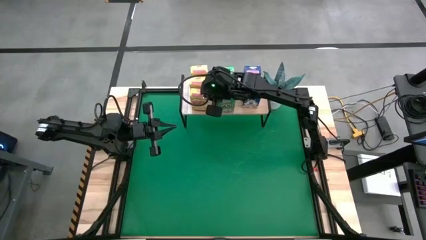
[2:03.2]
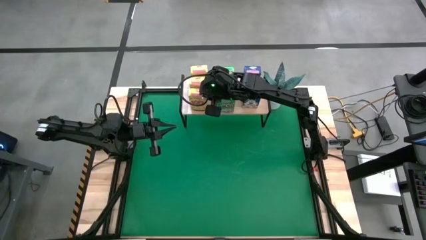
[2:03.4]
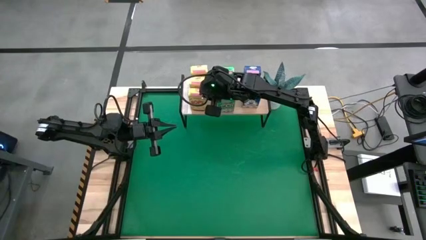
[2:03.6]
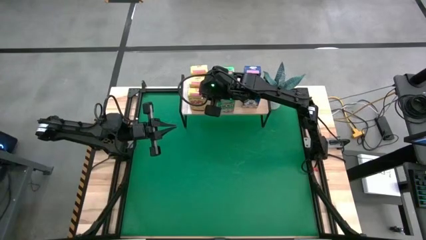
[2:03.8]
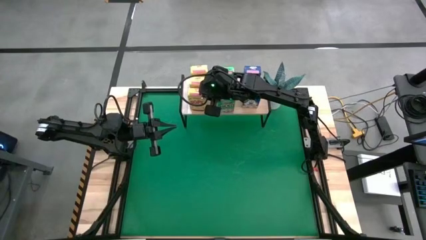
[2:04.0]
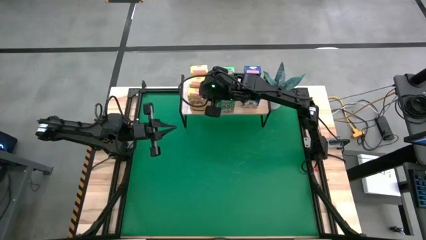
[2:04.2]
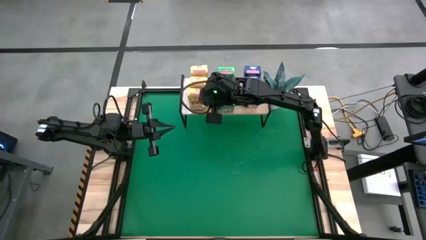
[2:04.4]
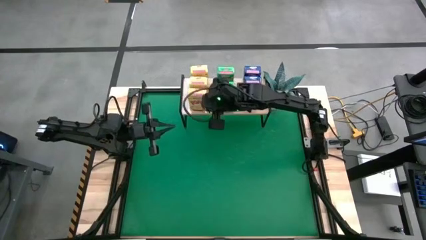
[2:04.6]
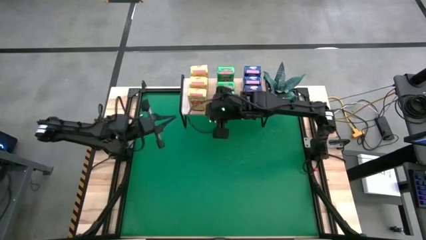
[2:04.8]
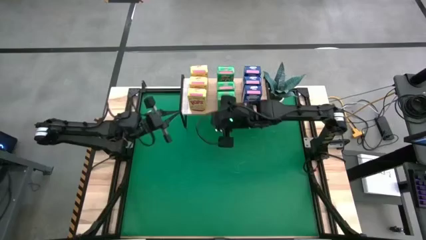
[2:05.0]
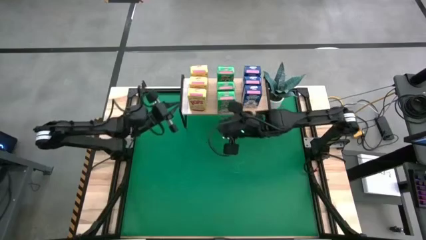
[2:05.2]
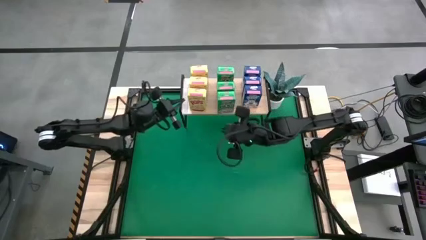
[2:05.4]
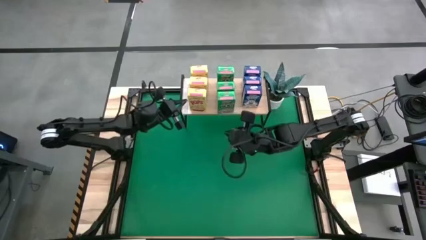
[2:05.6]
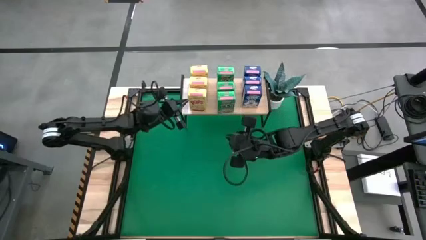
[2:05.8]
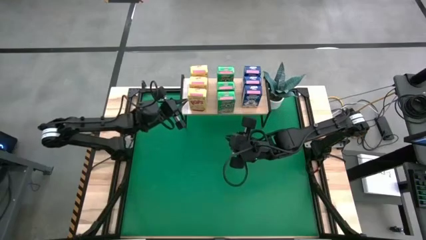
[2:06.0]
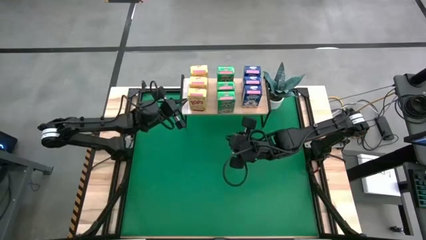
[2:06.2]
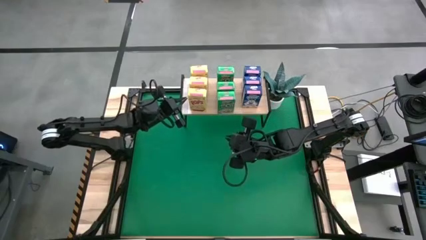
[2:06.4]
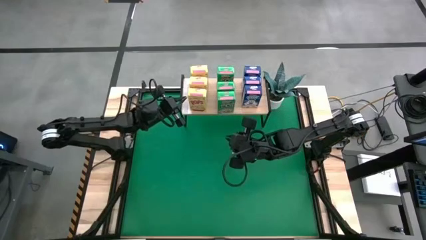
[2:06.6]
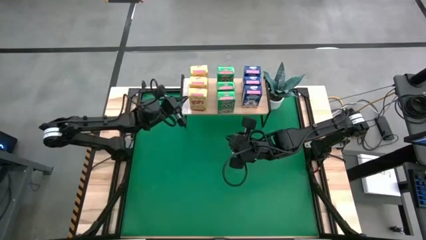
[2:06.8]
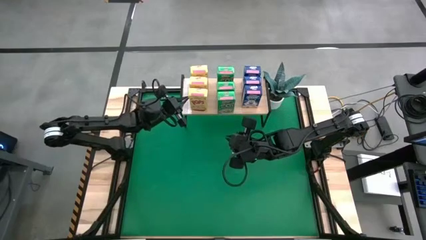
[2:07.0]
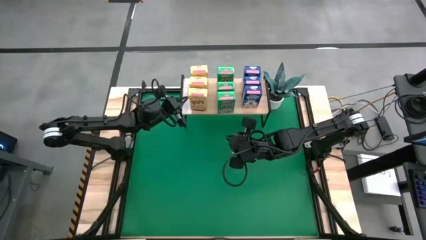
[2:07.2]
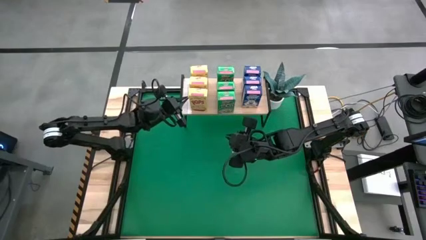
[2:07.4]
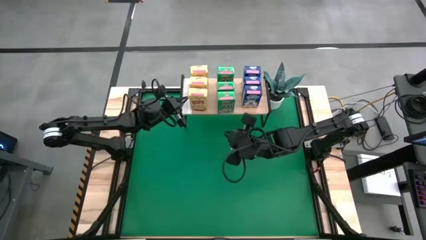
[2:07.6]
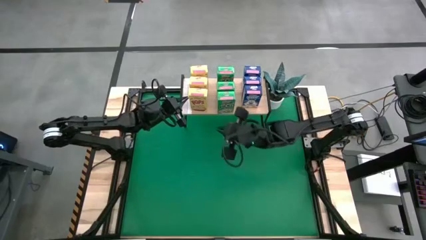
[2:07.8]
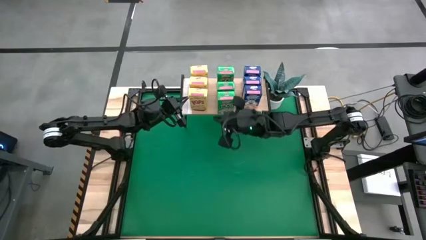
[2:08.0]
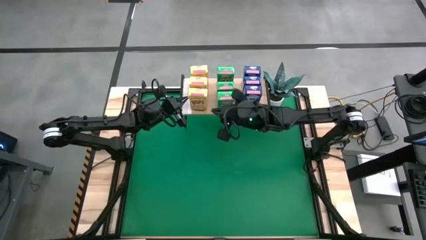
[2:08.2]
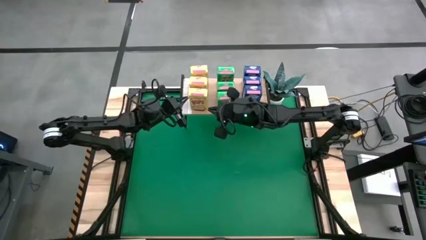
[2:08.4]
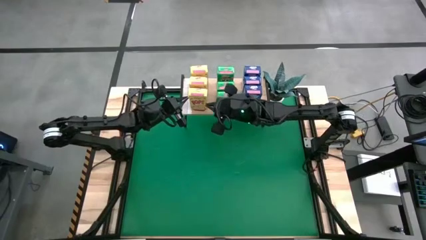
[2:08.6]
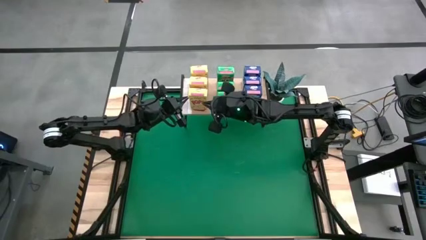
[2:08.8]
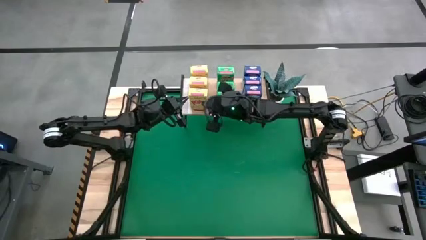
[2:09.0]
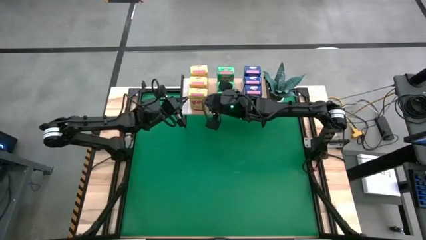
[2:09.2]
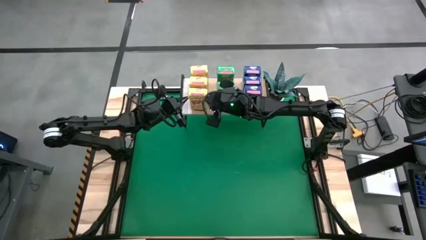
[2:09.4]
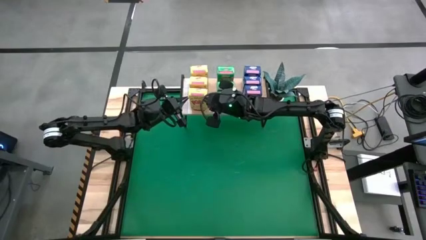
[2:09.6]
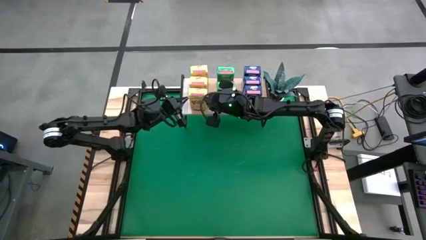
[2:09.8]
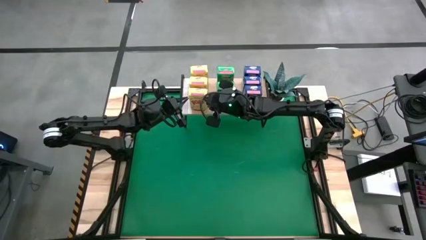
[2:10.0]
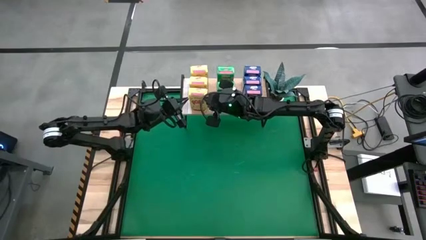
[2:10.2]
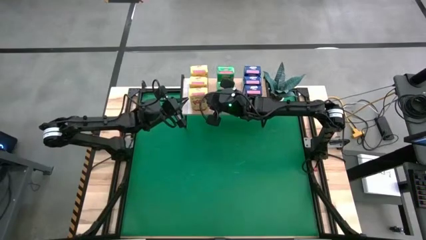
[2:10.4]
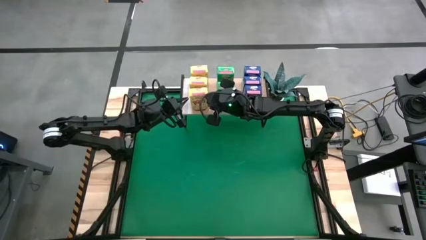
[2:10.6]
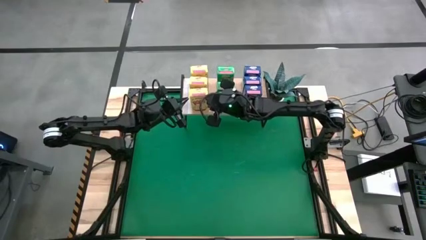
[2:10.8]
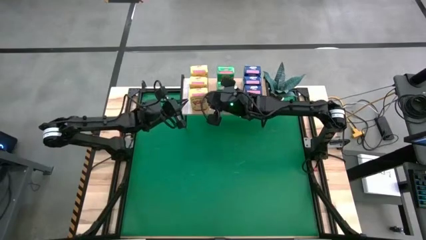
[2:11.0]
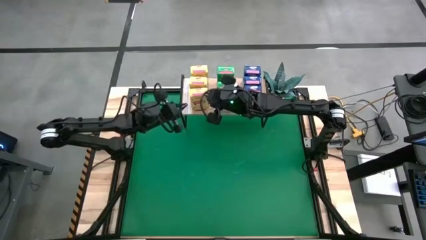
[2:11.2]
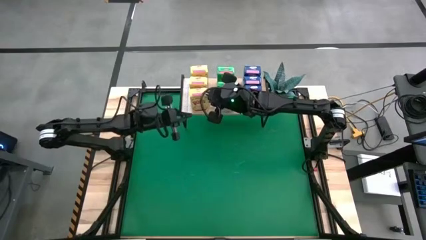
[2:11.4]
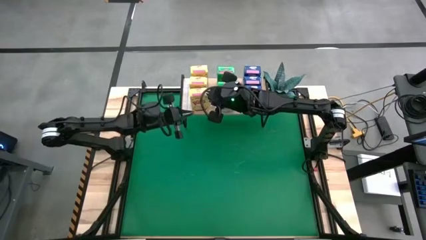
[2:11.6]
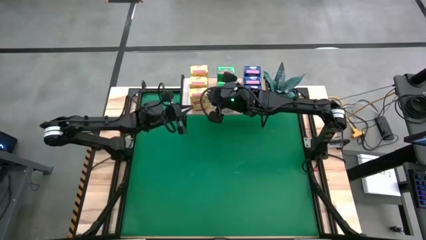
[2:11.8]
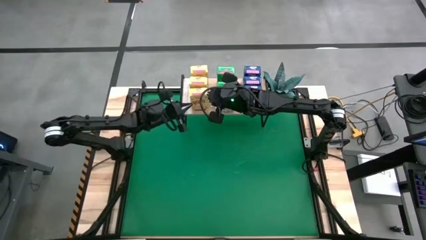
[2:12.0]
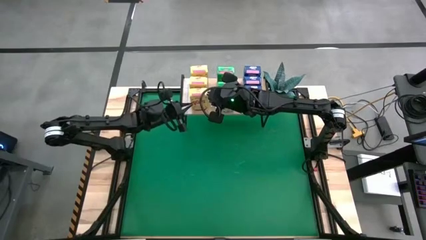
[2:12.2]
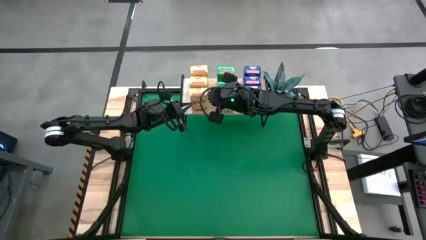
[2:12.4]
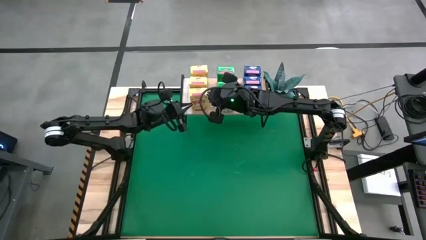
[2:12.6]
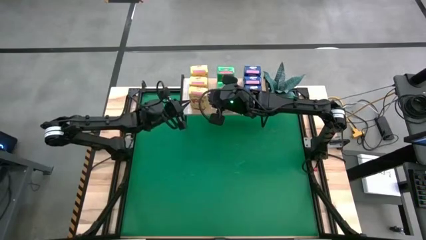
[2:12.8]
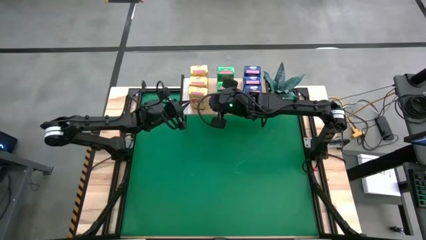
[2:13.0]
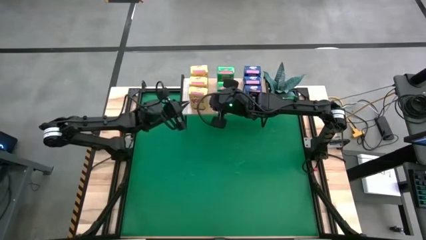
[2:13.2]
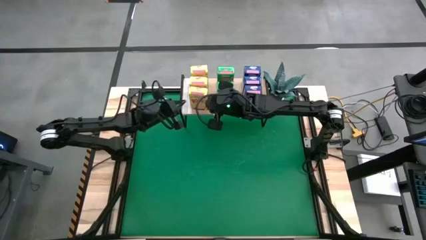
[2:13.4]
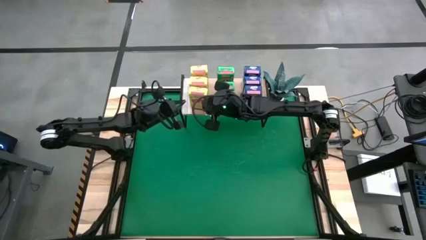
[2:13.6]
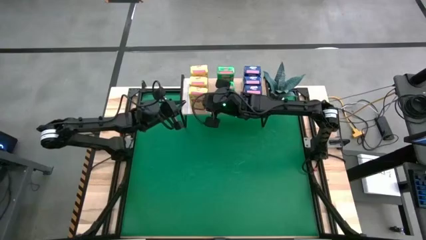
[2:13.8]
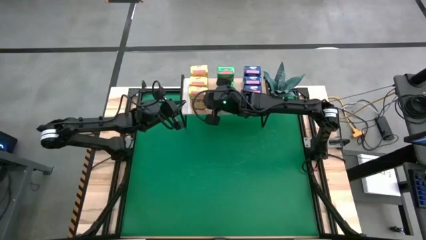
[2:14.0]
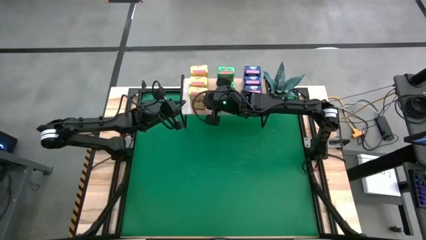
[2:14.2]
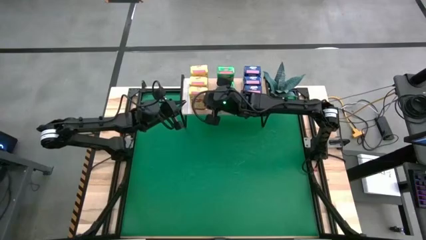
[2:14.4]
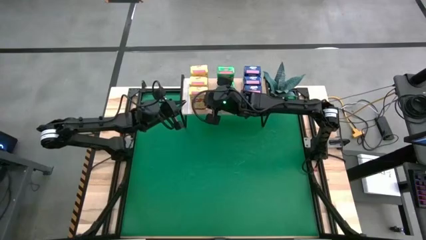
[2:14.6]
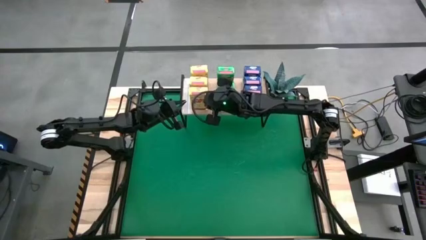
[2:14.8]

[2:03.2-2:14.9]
Task: Stack cereal on shelf
Put the yellow cereal box on the shelf aligned with the other yellow cereal boxes

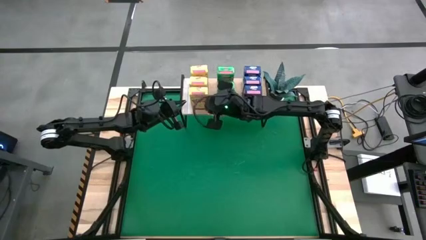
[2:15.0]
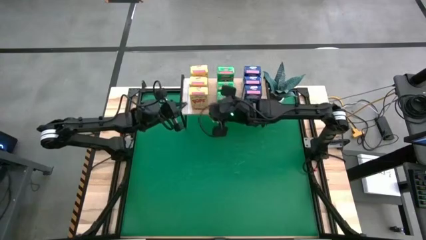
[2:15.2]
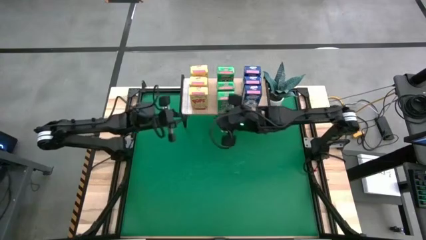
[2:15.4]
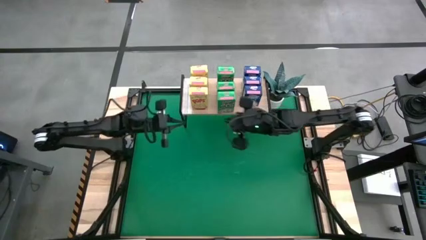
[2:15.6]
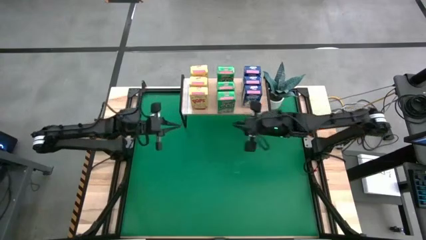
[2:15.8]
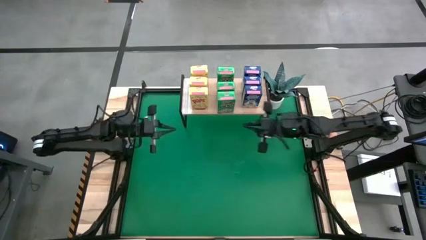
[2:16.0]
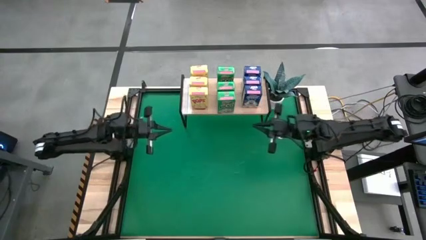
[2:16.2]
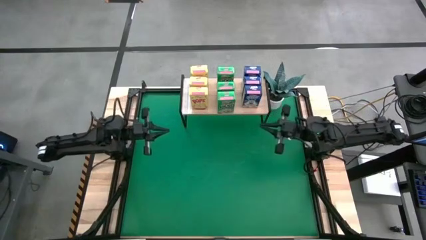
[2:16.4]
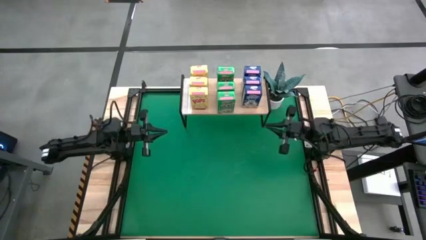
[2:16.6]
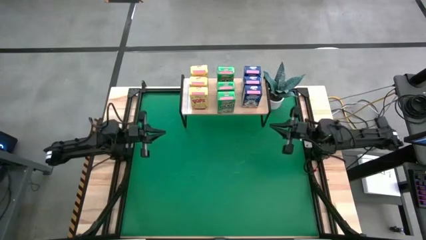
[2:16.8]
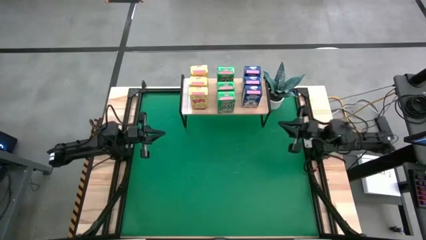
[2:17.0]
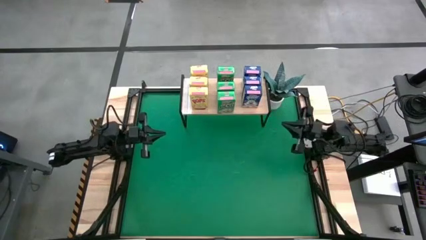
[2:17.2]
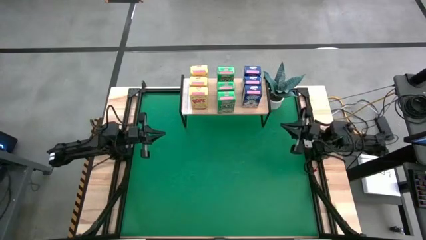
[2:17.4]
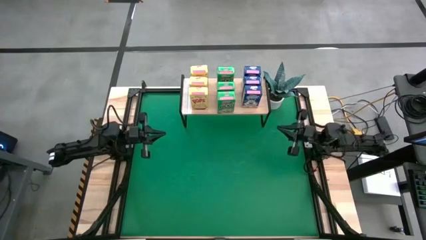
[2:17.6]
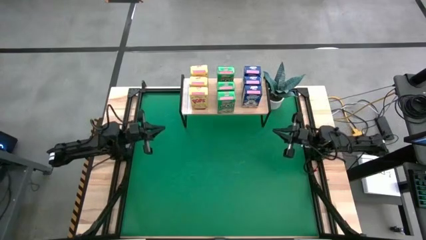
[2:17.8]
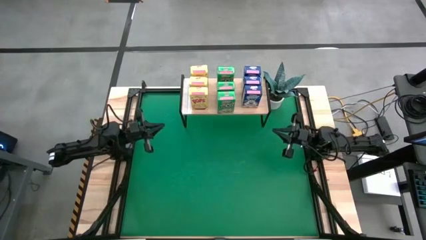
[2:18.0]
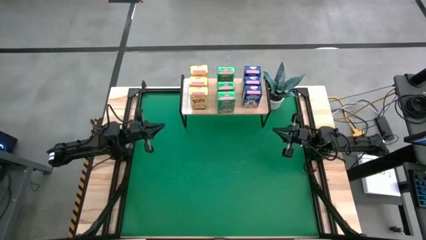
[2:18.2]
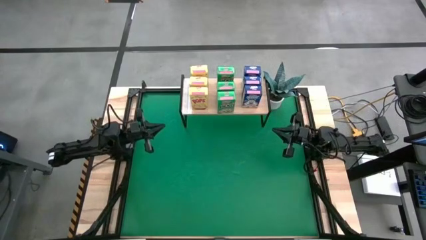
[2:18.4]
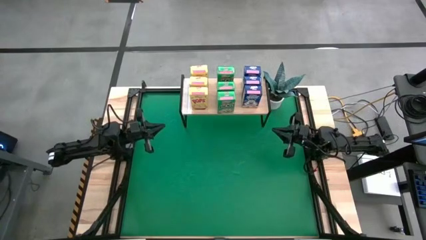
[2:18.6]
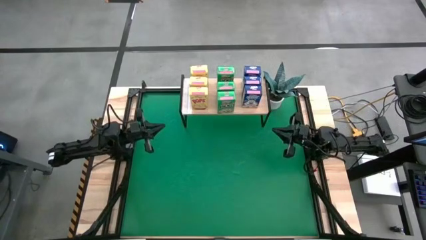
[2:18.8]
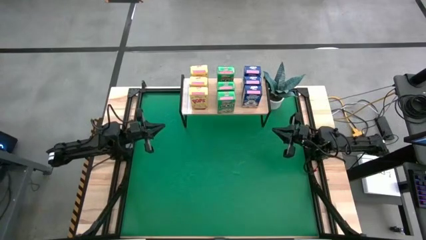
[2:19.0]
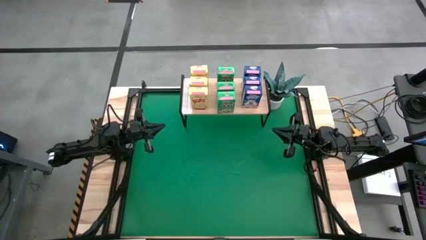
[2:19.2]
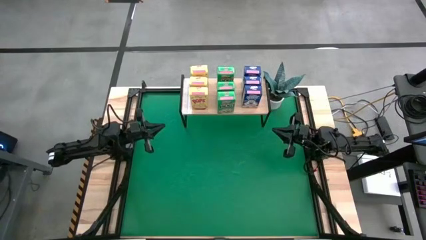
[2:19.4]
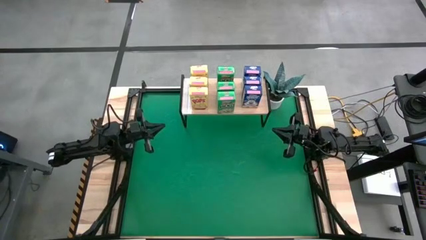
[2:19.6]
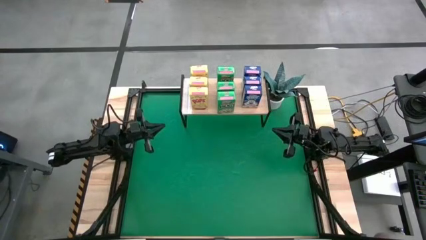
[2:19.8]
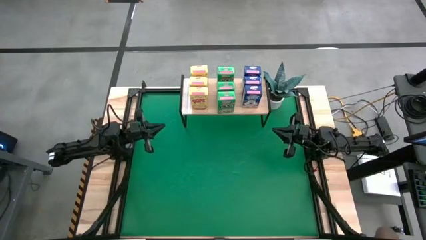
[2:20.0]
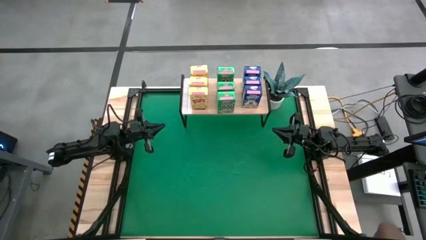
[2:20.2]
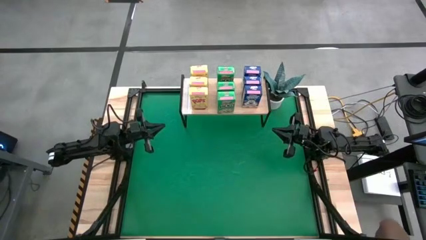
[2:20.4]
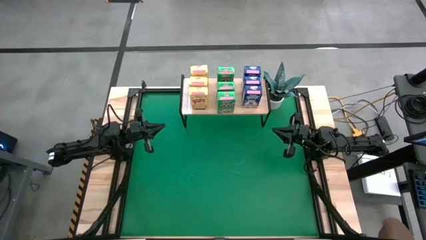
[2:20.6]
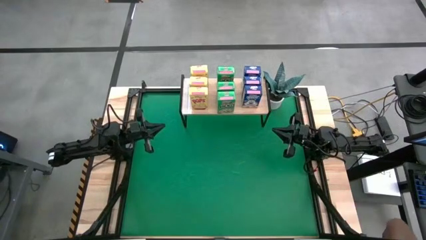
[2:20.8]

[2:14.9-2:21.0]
Return to Home Position

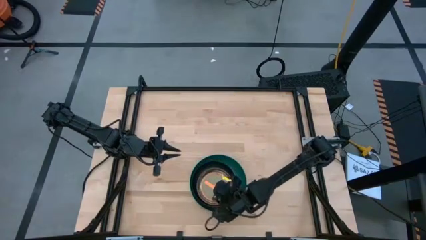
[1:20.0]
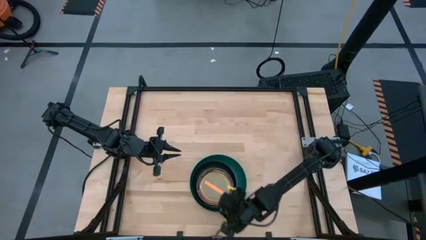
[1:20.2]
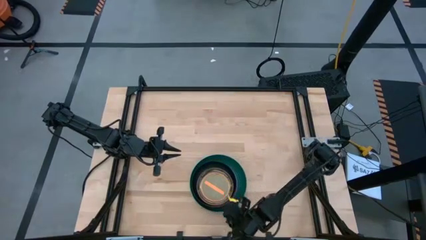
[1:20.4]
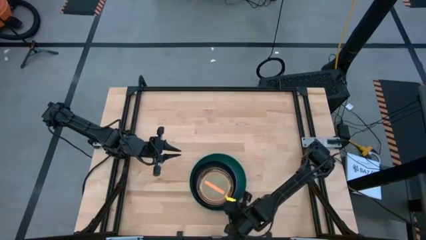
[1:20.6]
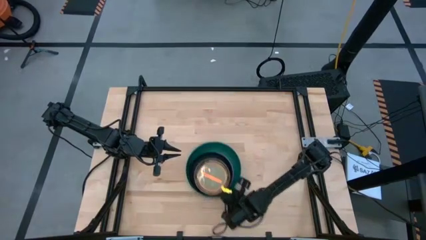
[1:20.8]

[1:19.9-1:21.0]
Task: Stack plastic plates
Adjust the stacked plates
